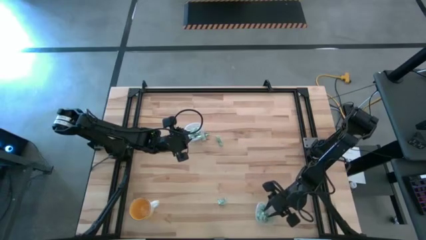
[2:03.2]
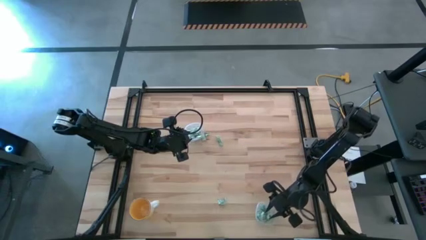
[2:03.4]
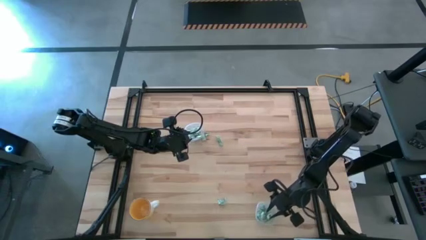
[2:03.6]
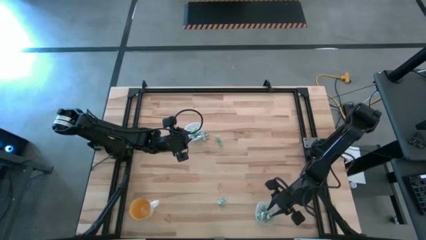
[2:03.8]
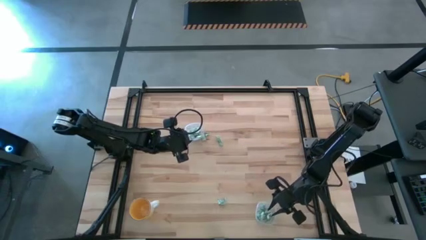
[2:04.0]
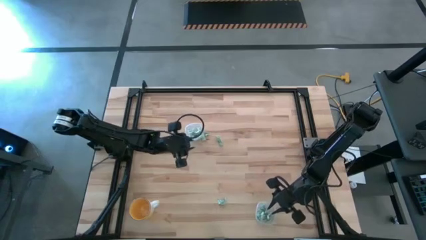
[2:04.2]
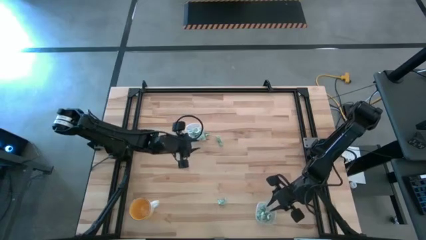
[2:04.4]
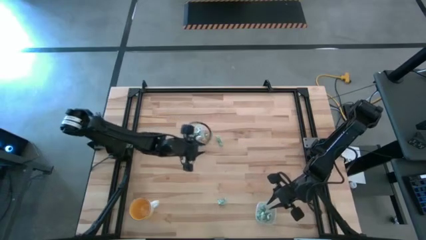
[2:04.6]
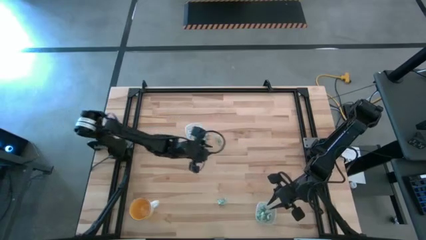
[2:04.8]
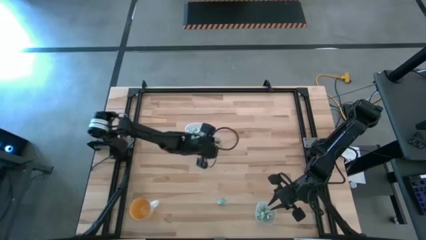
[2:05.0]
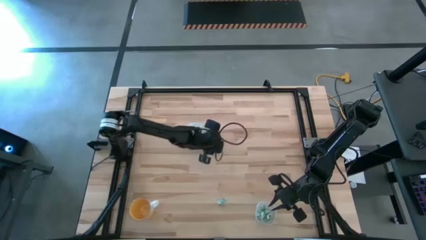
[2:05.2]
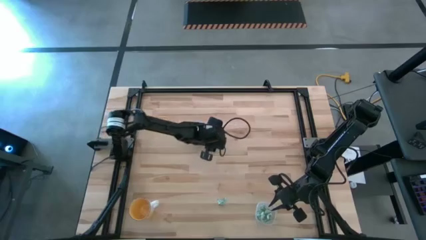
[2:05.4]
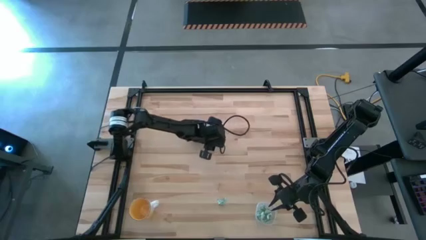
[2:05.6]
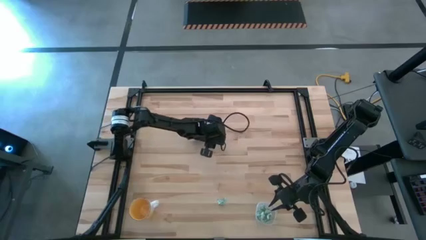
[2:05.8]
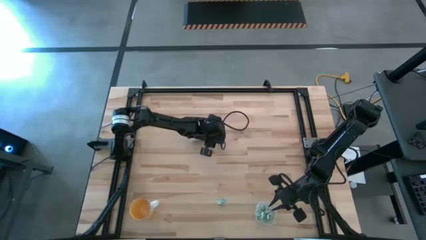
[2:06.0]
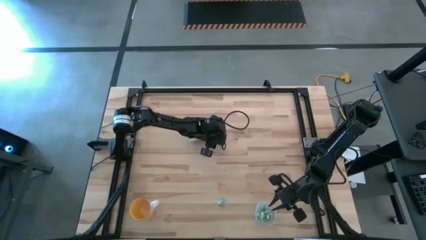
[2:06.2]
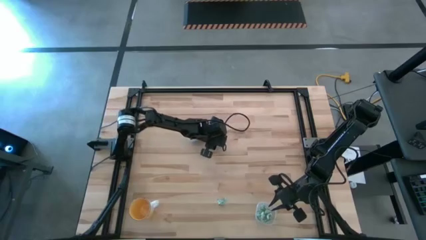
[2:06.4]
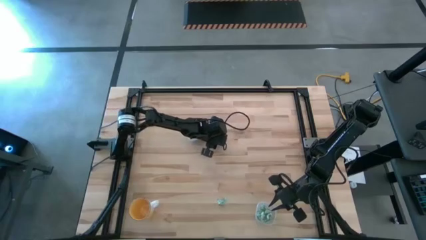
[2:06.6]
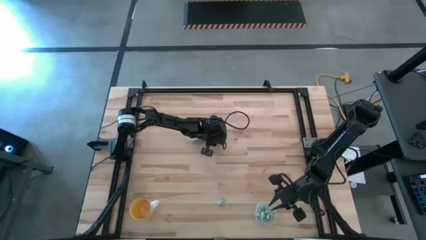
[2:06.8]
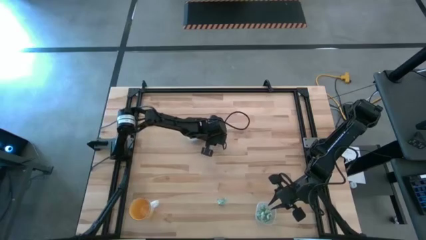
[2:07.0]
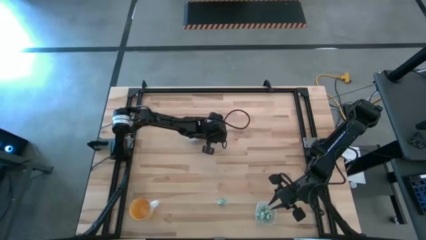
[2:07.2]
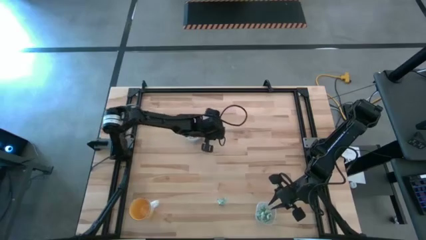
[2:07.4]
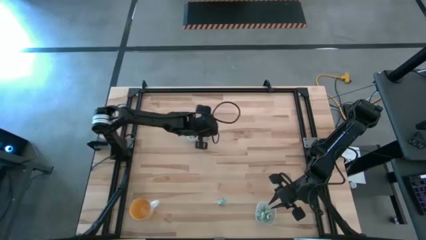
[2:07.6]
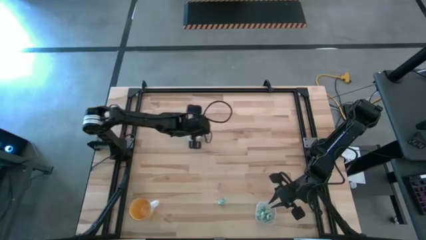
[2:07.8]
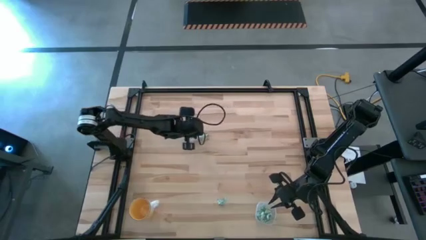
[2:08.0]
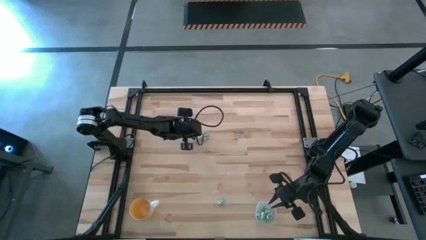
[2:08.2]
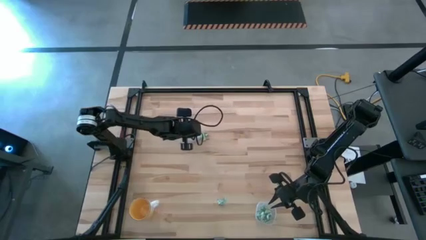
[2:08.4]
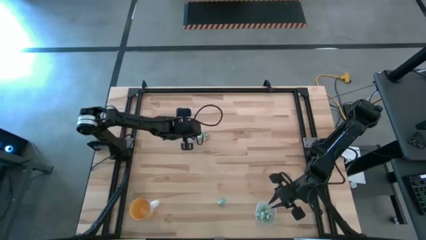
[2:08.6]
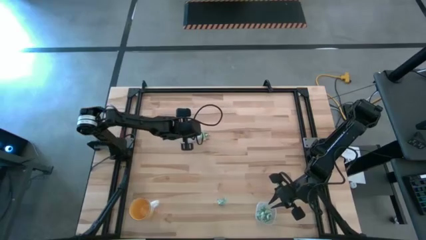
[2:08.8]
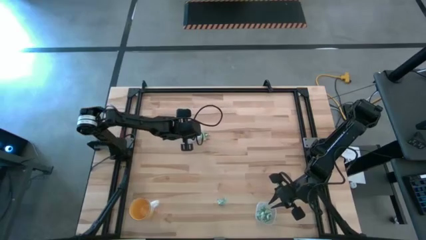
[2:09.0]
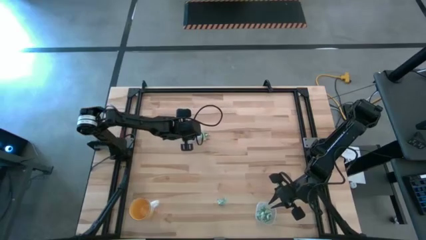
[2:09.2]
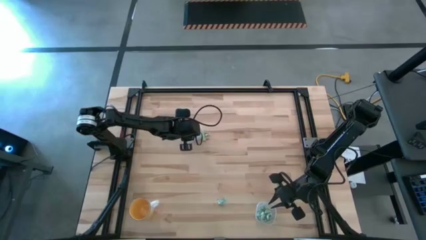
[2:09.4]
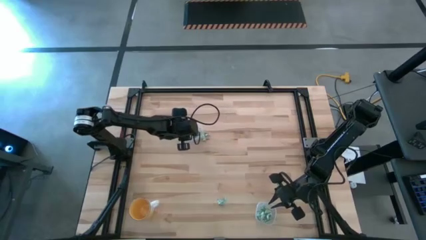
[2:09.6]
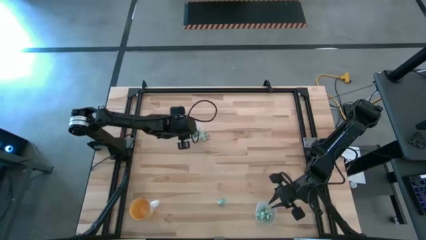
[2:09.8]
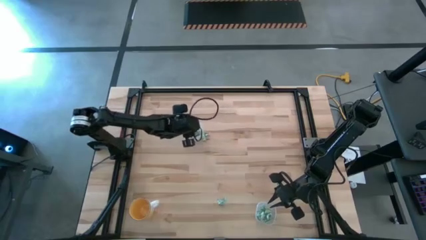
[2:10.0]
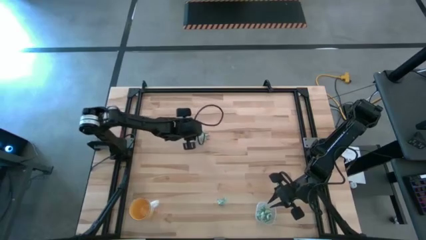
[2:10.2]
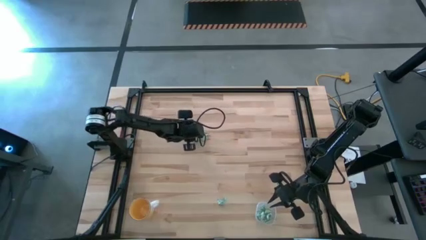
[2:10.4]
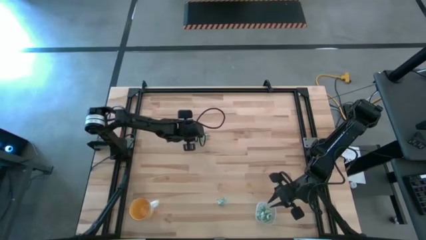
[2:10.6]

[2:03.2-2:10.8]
Task: Pick and place Stevia / Truvia into bins
Put the stevia packet into the top transparent container

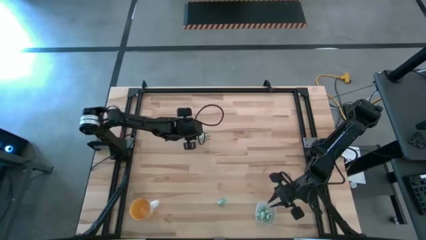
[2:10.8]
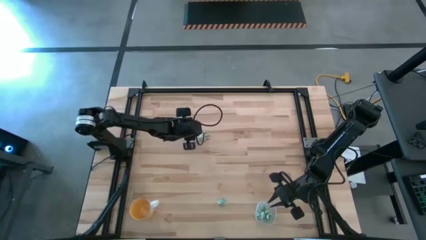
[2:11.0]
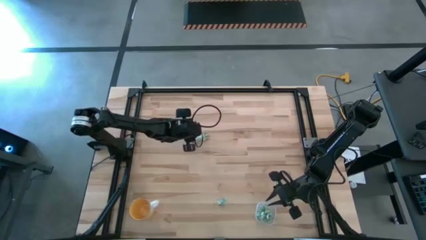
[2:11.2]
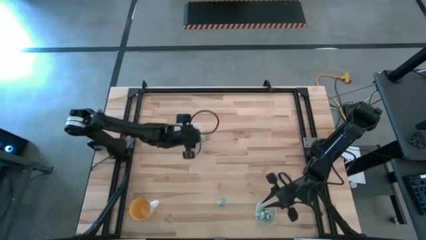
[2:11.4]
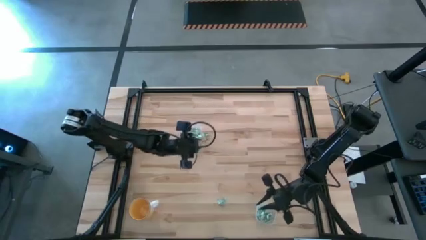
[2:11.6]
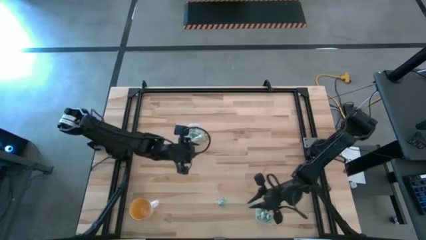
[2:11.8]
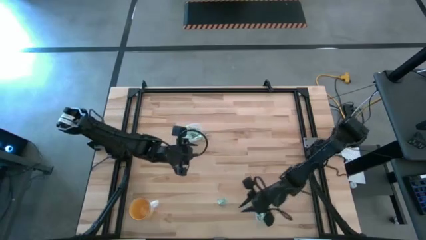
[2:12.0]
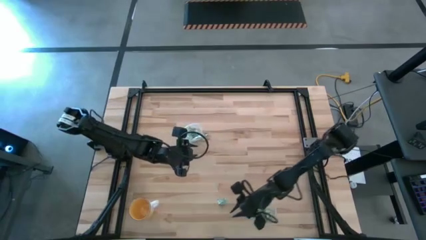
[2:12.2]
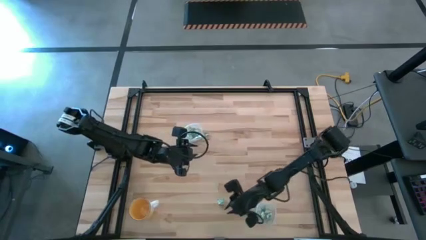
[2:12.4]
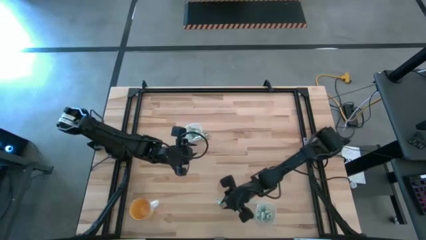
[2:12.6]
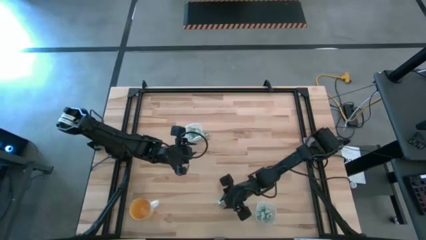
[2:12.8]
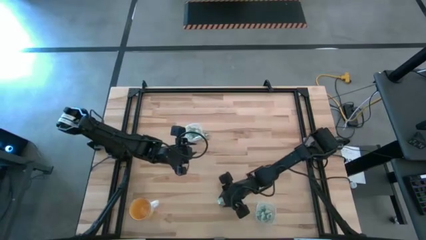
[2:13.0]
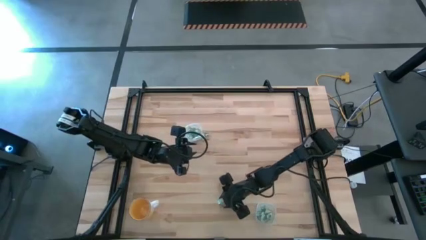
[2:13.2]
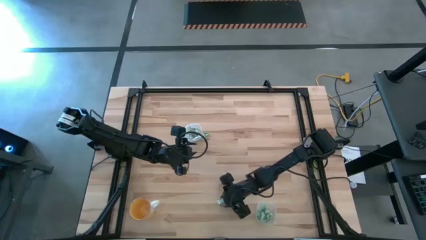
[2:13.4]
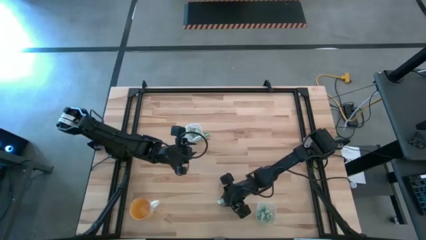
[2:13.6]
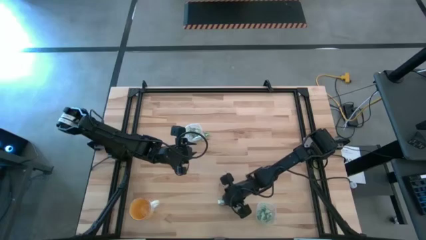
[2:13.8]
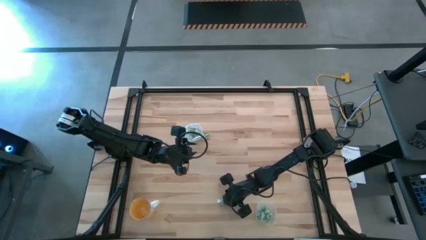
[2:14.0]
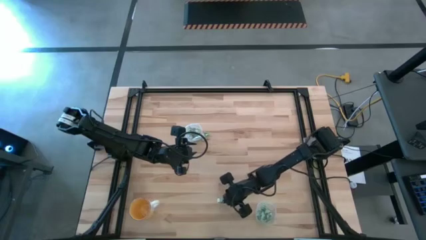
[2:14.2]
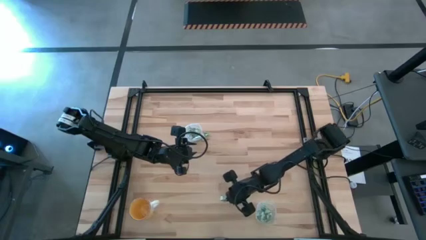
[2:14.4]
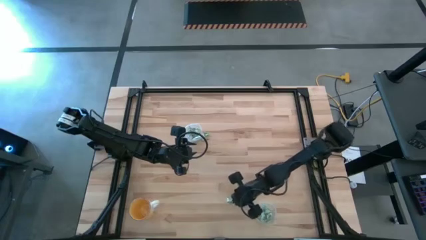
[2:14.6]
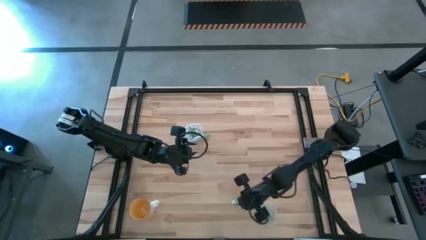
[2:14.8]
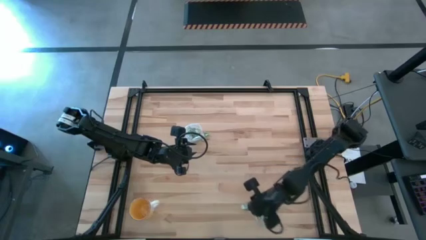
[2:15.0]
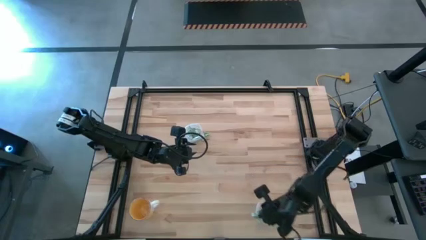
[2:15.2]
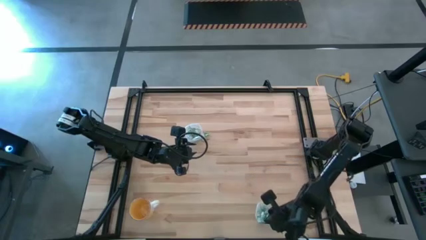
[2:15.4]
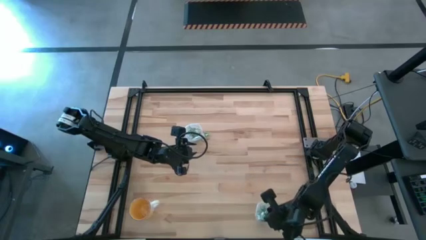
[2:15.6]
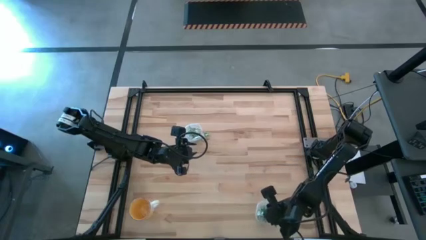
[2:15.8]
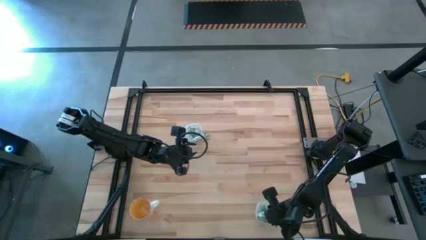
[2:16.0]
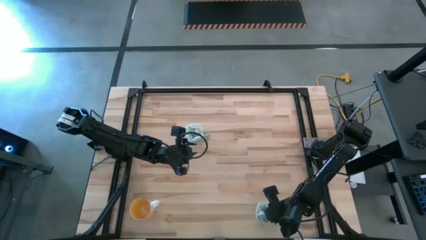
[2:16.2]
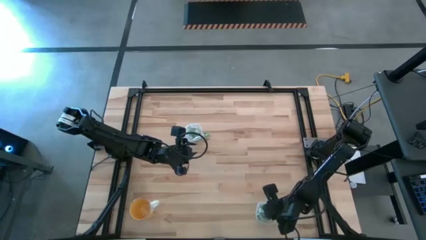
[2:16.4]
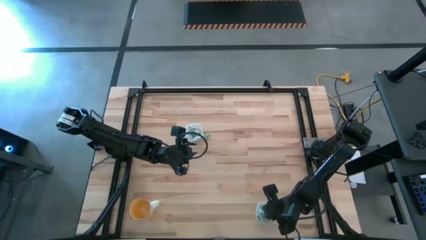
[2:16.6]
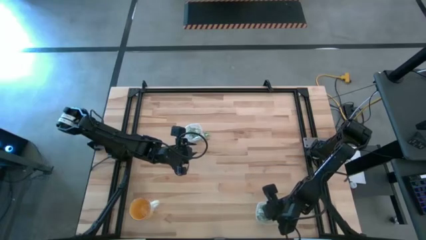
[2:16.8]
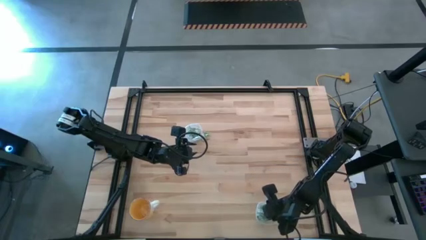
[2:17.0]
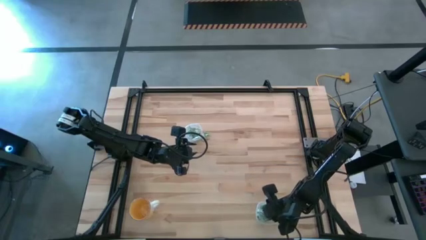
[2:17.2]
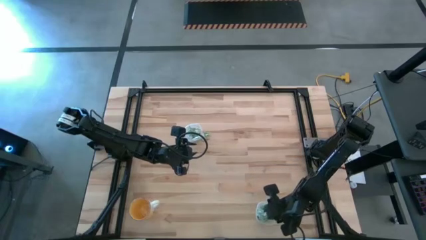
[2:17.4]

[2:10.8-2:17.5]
Put the stevia packet into the bottom transparent container

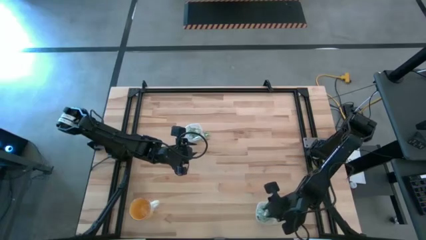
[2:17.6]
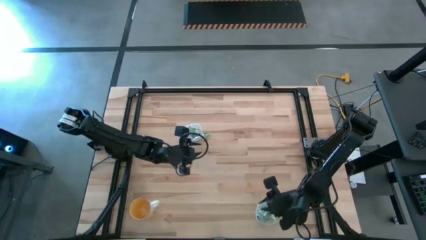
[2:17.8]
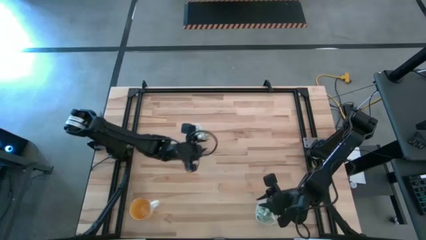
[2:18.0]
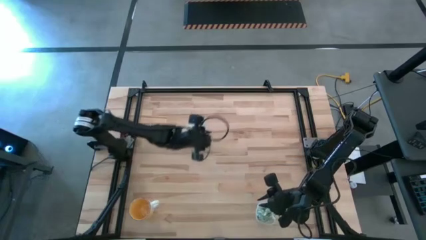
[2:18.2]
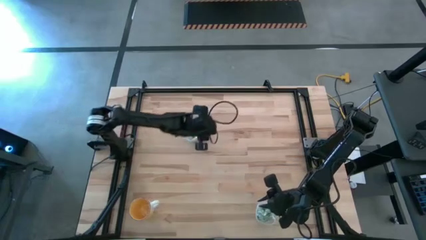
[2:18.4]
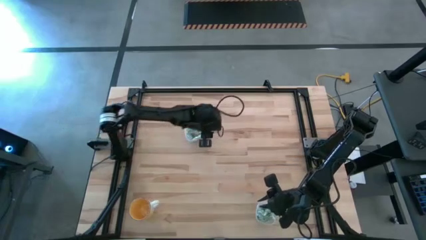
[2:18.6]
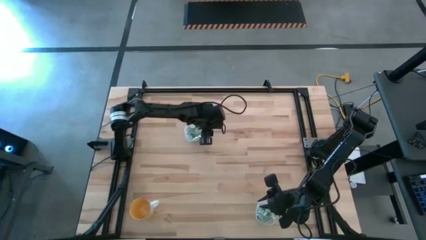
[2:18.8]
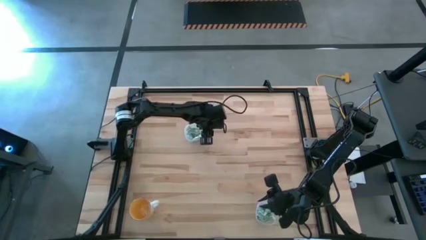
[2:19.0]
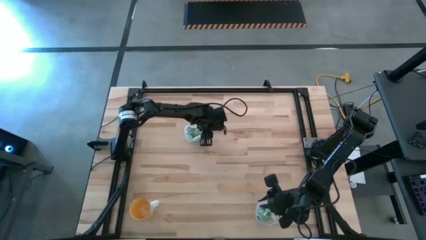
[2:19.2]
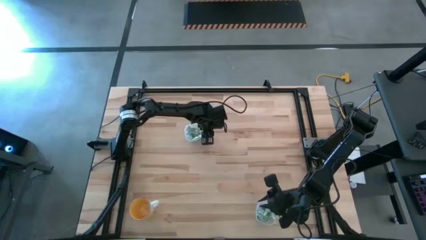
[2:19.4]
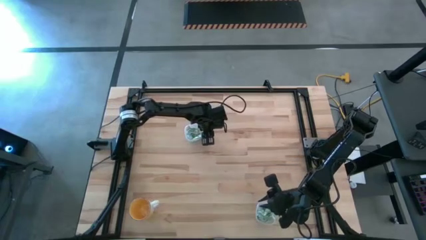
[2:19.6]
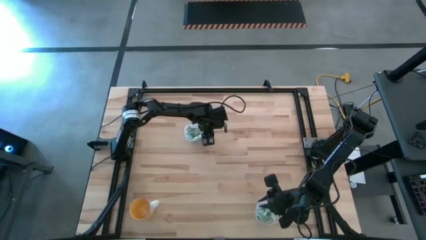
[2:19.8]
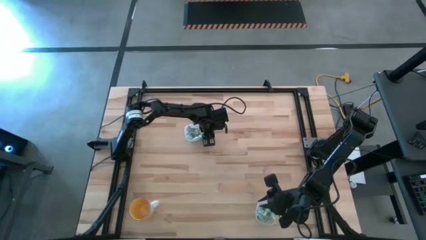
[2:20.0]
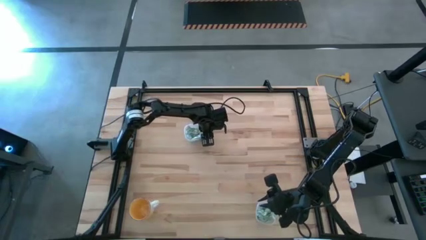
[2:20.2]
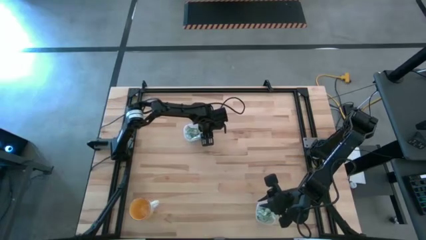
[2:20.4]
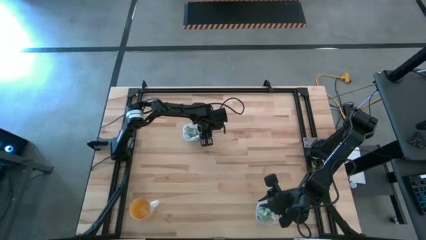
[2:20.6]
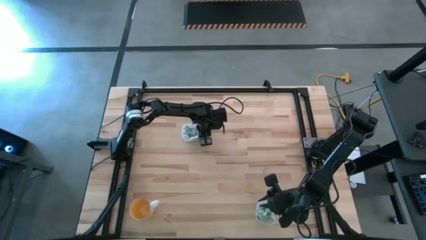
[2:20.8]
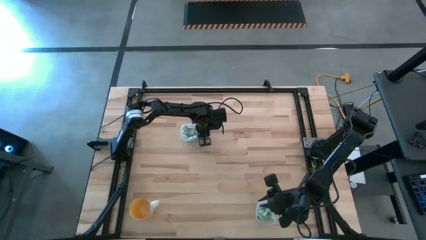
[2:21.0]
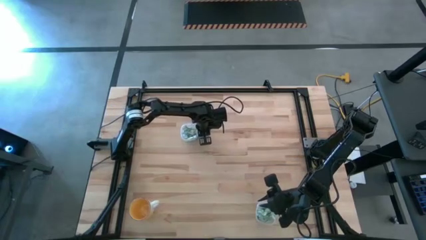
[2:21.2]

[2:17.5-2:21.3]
Put the stevia packet into the top transparent container
